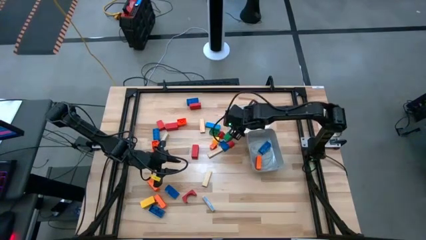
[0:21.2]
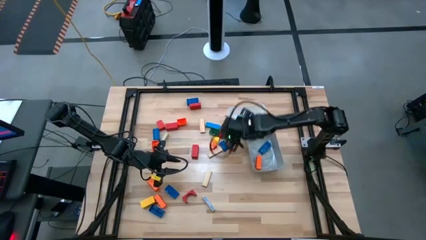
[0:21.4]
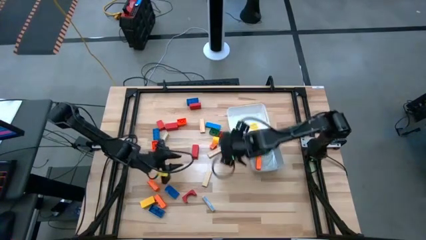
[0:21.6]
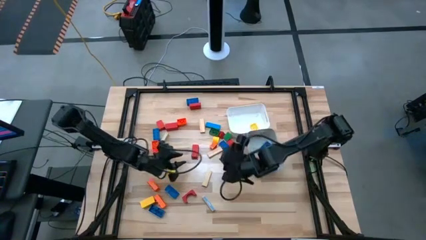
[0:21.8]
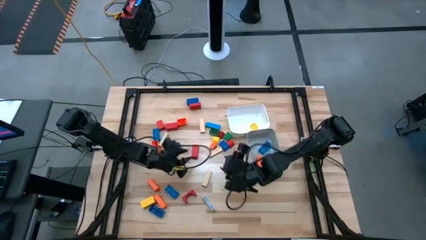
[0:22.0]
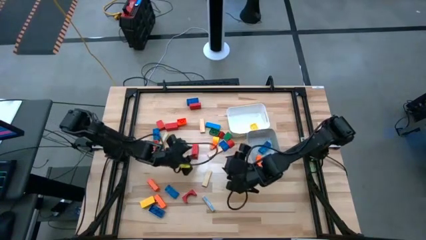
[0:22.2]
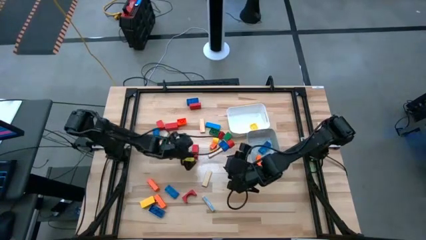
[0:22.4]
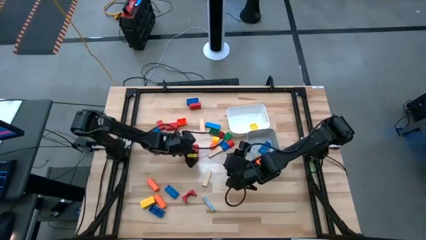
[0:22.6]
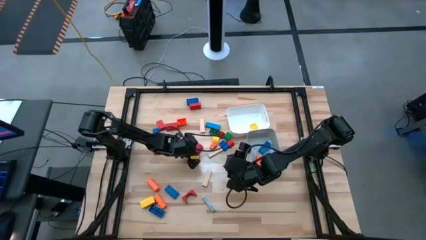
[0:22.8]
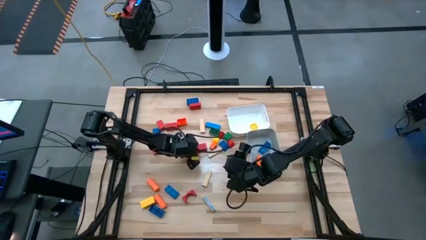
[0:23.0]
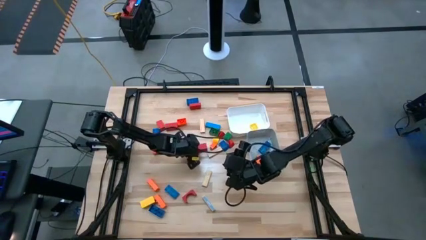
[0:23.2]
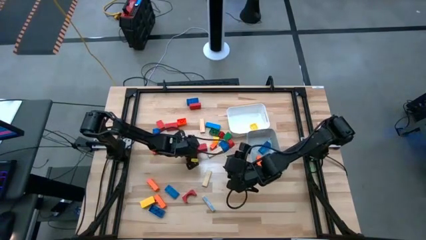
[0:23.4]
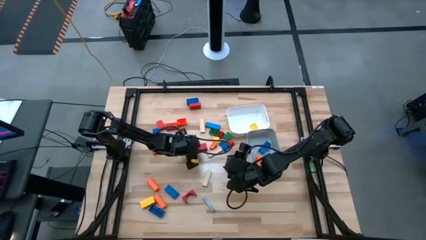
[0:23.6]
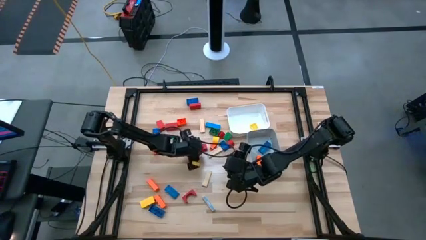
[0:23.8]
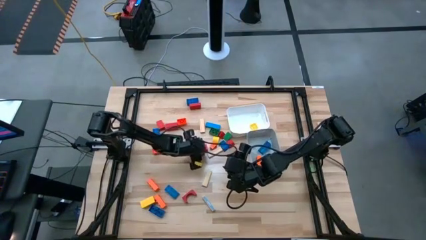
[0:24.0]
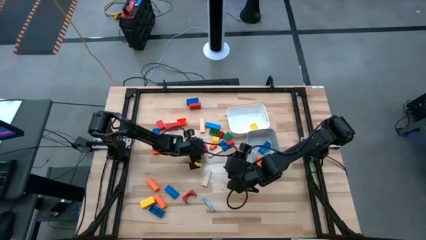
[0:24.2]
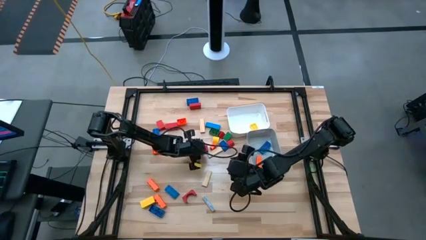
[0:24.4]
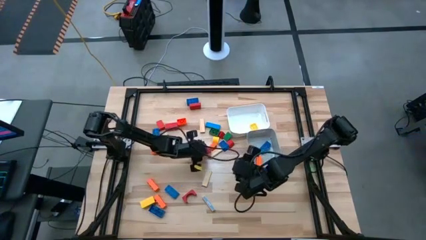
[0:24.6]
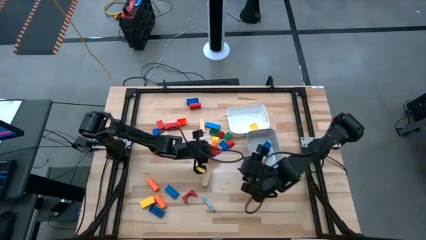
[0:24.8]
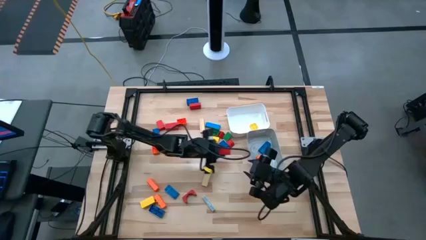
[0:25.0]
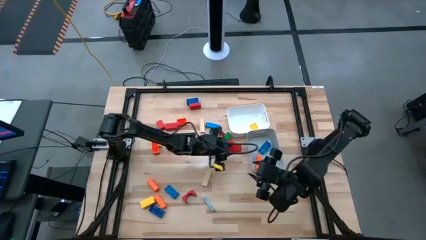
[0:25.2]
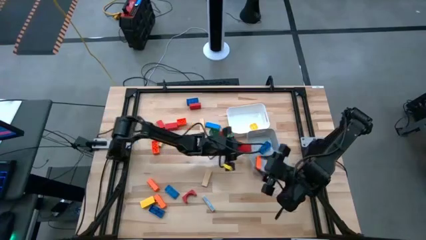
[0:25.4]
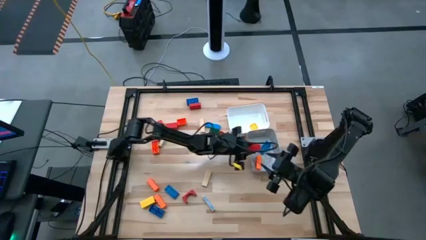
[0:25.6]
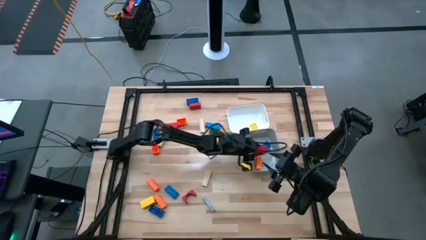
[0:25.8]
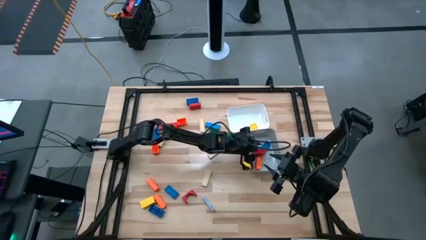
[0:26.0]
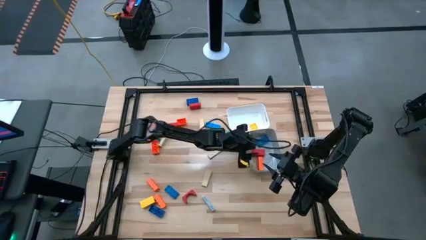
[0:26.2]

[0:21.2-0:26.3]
Task: Sort blocks by size
Put the large red wooden block into the gray bin

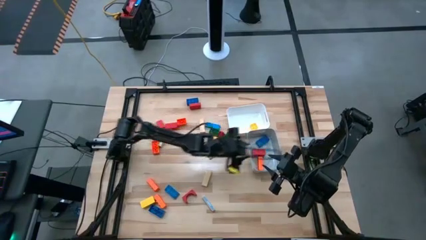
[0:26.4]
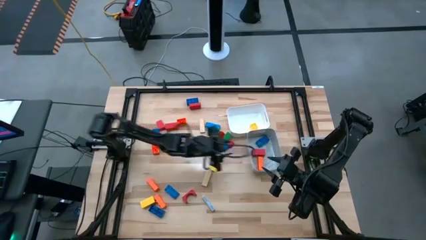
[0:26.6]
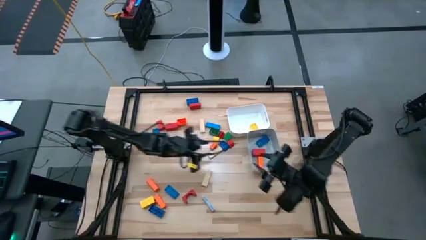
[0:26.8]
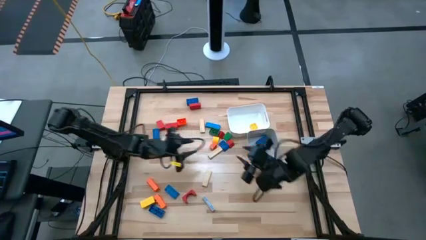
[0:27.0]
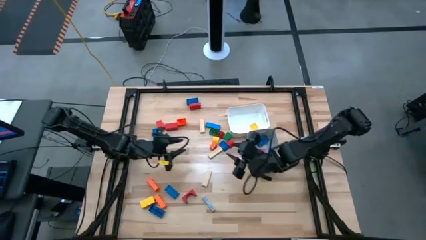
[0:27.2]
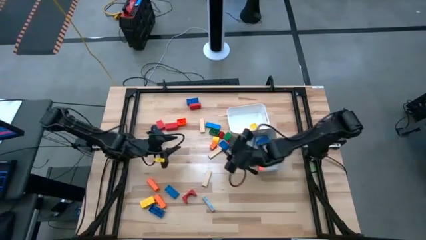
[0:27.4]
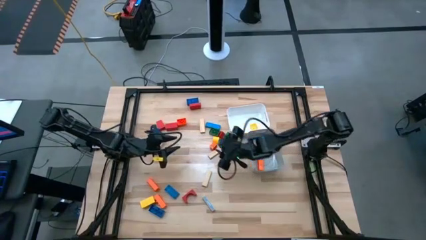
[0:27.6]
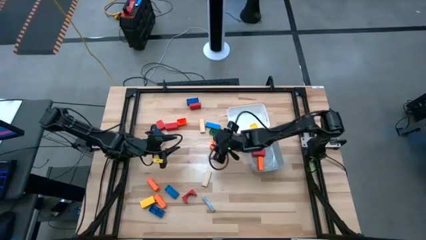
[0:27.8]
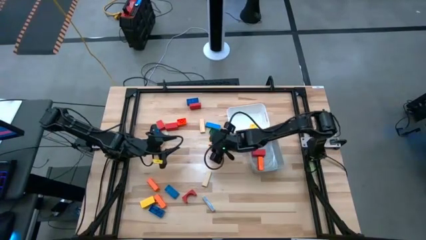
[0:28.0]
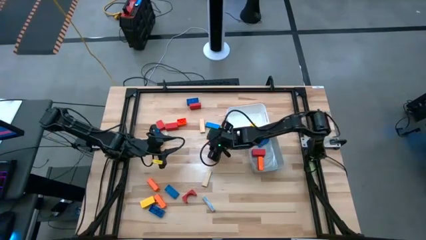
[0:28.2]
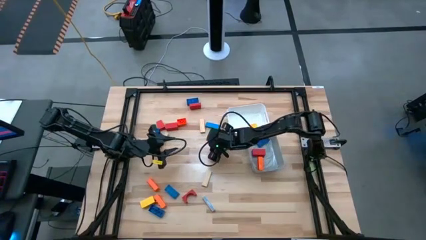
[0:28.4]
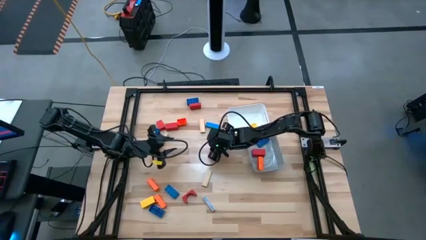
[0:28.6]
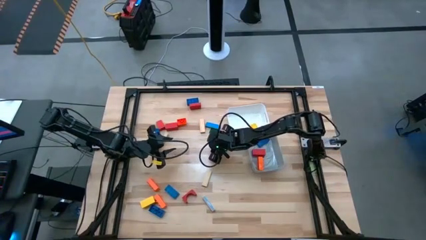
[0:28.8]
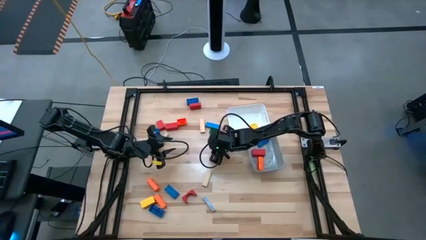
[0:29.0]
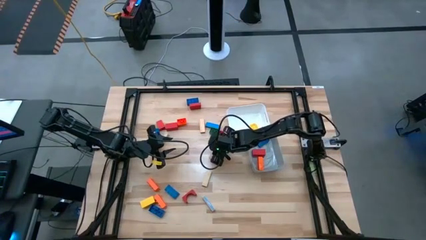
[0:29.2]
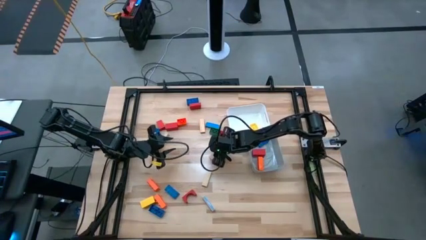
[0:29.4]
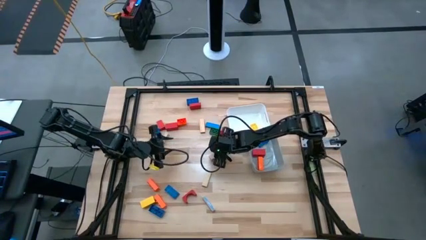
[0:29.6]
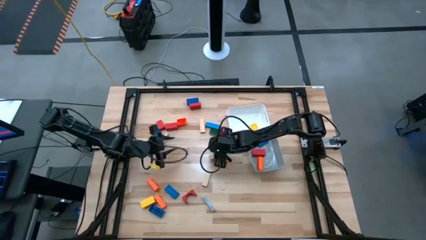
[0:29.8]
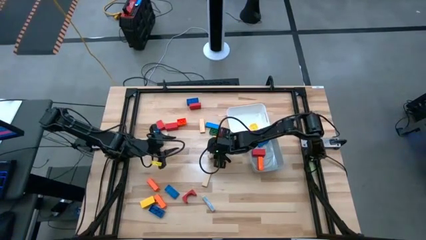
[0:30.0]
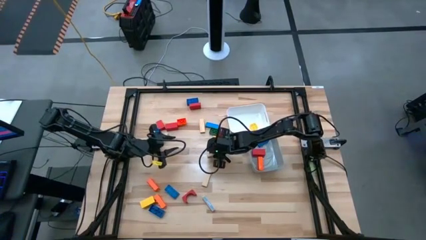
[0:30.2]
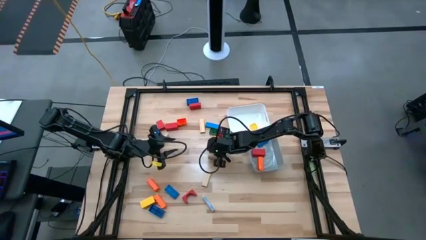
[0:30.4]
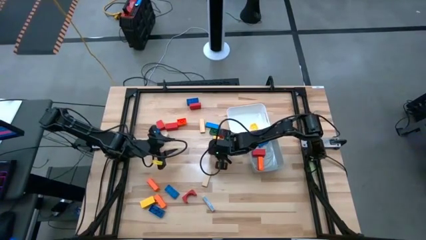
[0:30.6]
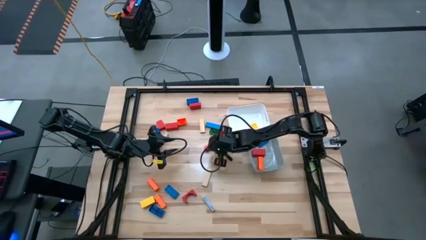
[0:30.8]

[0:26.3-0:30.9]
Put the small orange game piece into the white bin

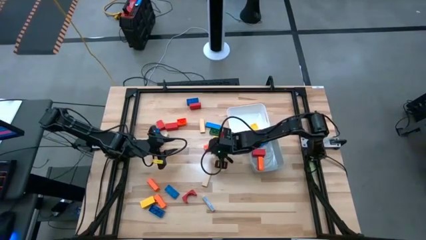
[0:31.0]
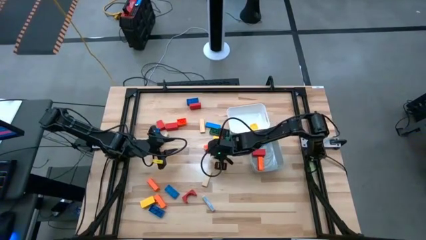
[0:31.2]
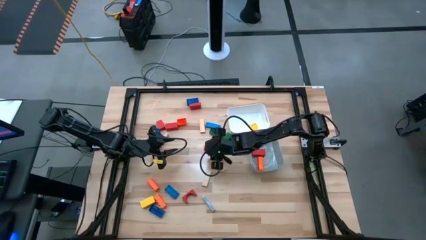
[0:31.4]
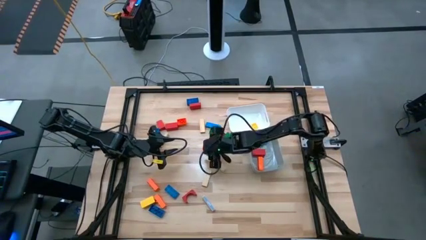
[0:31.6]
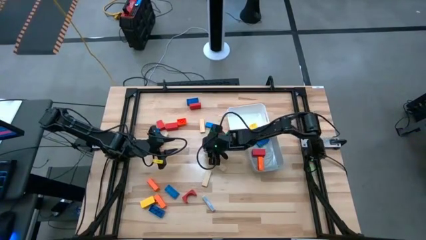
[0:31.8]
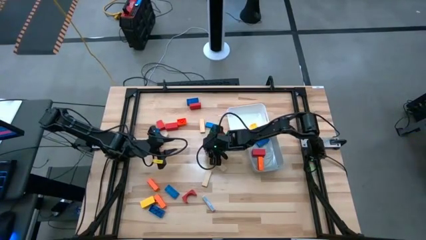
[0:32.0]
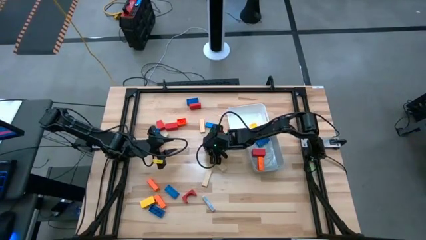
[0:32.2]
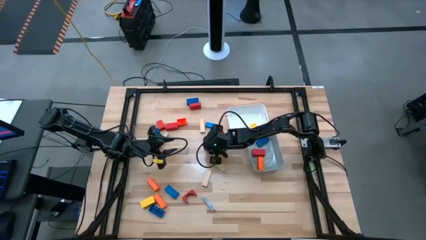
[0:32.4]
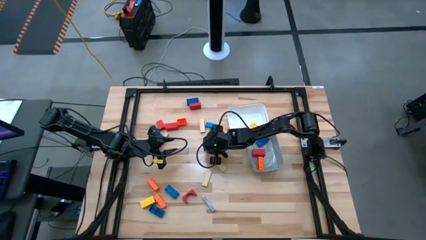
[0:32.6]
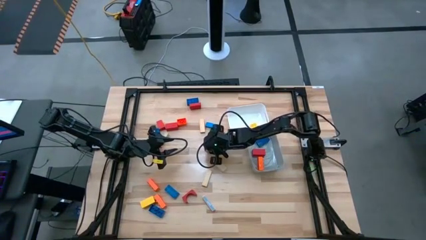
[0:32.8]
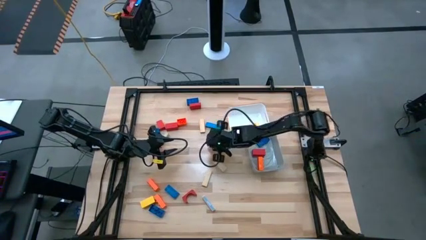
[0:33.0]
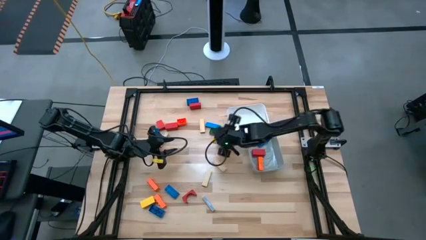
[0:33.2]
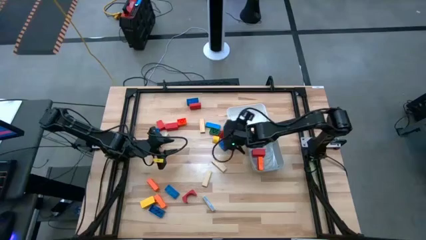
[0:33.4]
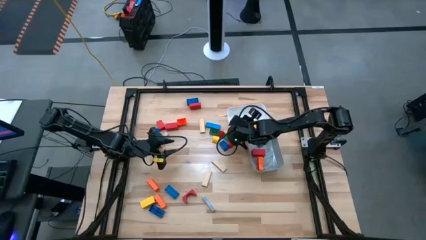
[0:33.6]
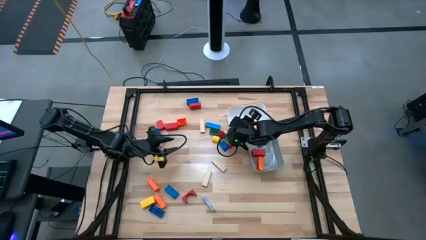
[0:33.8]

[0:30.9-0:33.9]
Put the small orange game piece into the white bin

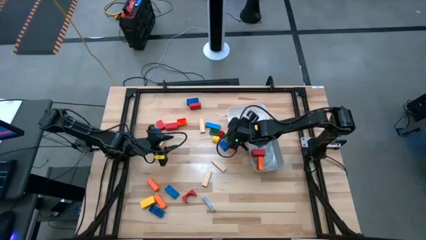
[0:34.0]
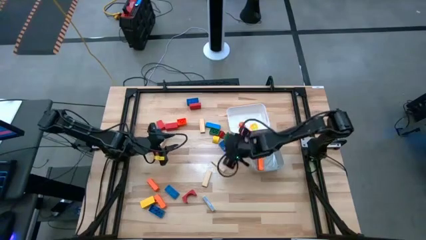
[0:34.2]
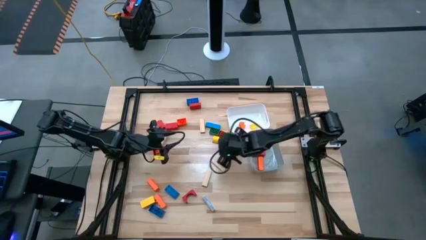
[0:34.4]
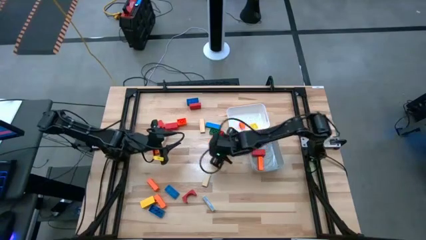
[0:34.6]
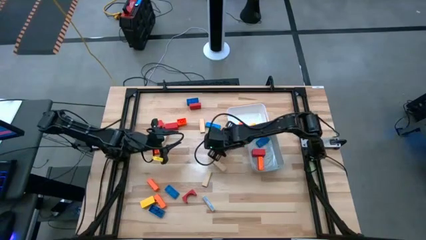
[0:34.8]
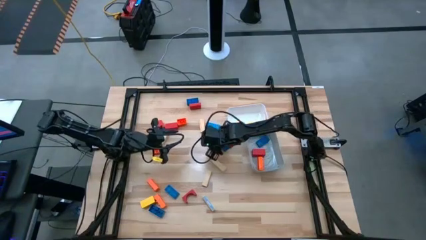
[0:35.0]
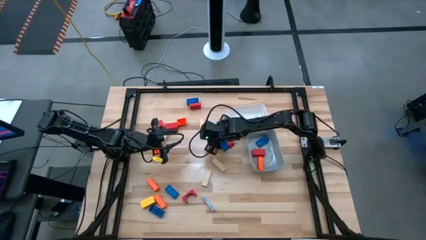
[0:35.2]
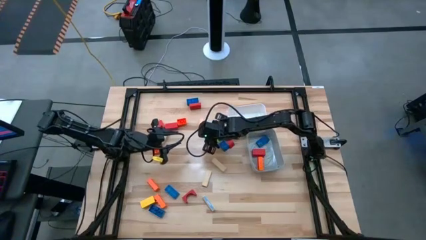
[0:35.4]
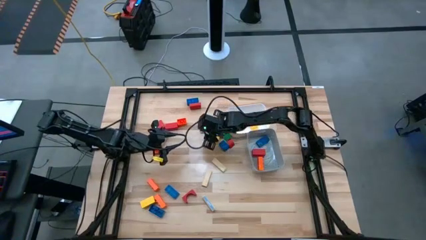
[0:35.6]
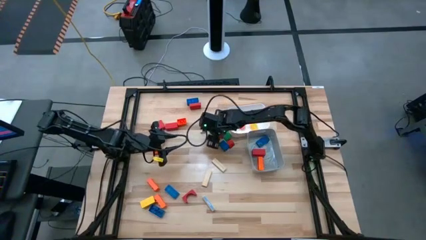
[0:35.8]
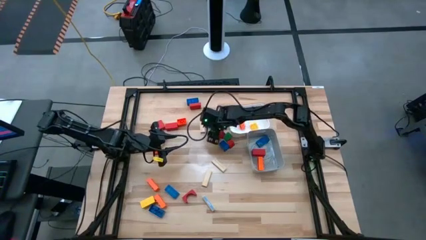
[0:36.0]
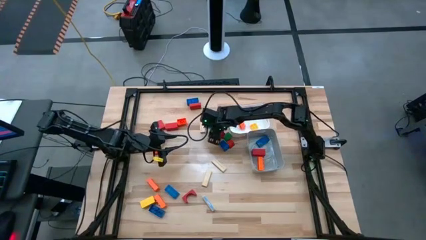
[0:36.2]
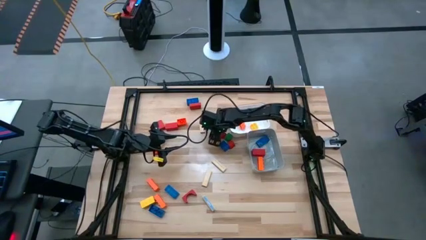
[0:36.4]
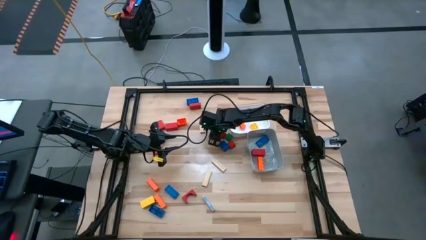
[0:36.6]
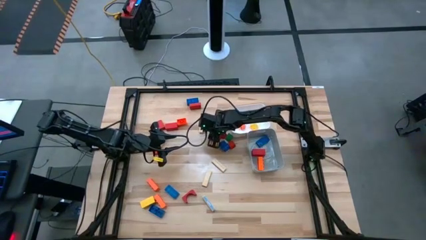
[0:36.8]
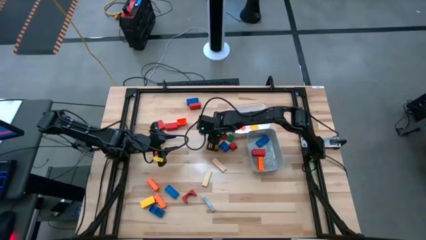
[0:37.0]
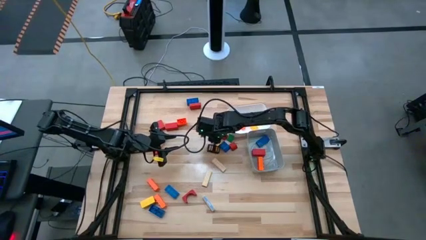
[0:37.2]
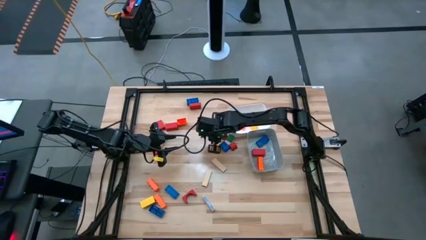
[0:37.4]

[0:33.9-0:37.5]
Put the small green game piece into the white bin
